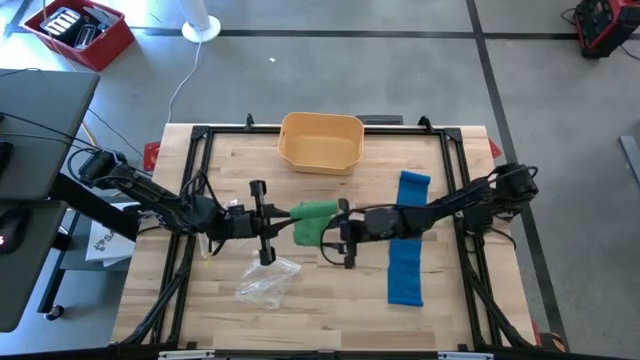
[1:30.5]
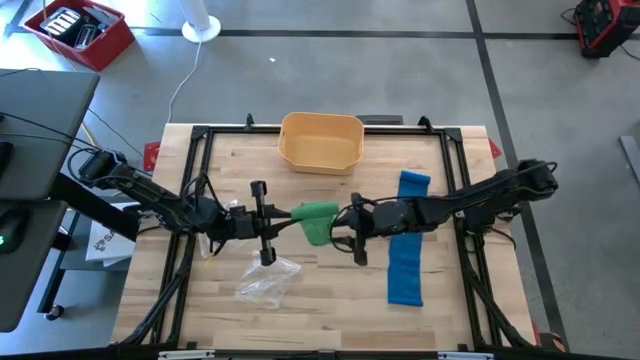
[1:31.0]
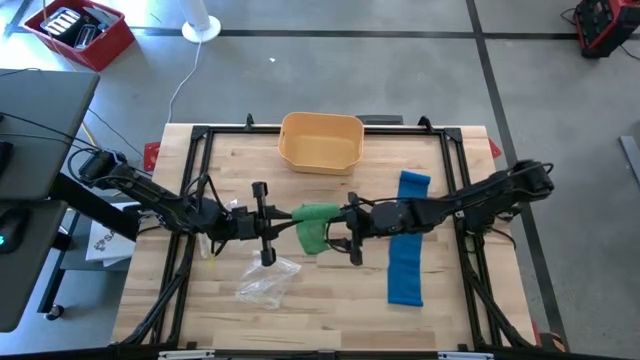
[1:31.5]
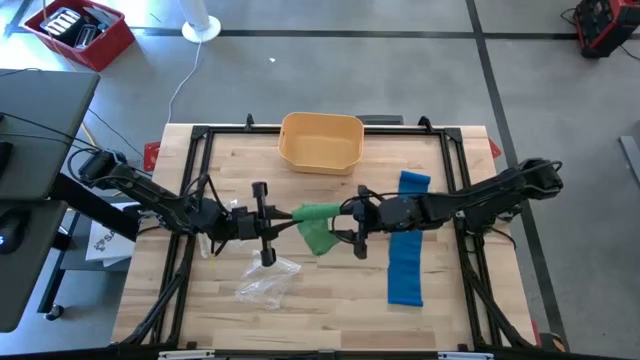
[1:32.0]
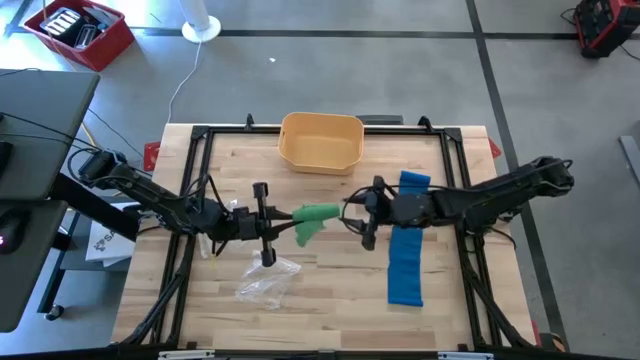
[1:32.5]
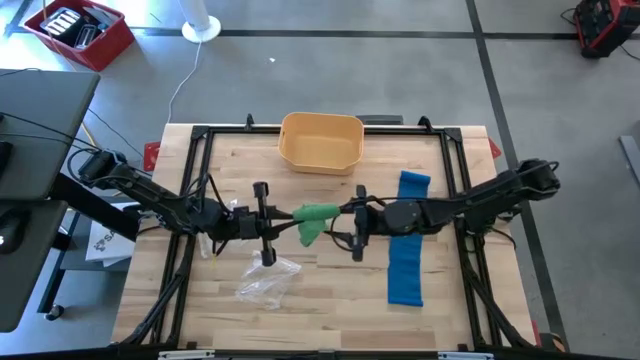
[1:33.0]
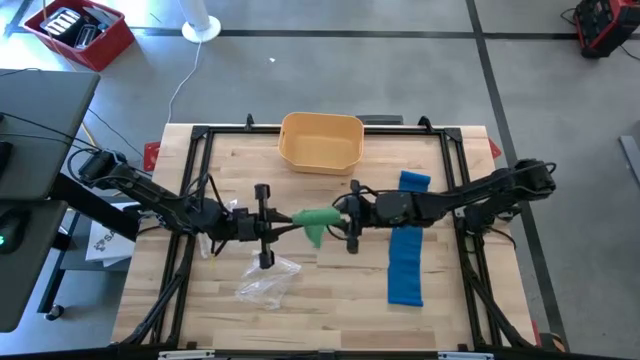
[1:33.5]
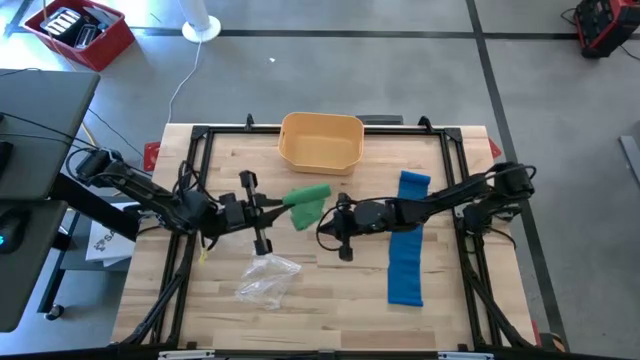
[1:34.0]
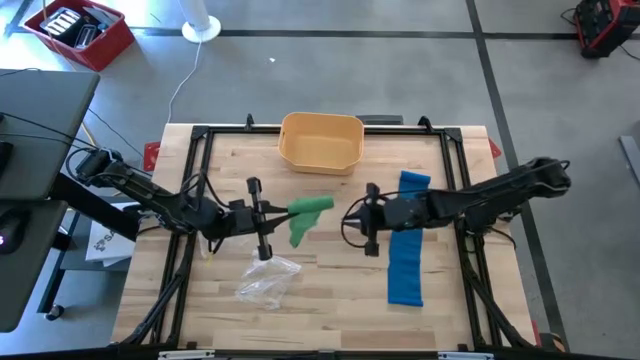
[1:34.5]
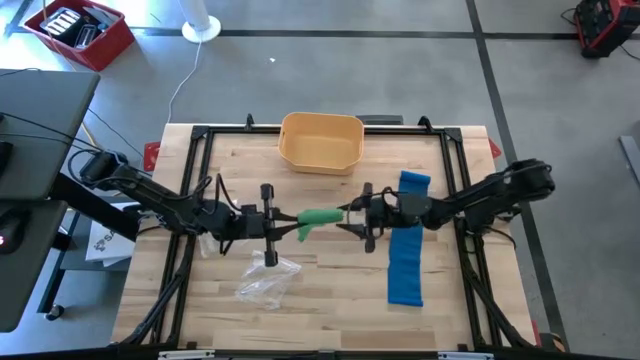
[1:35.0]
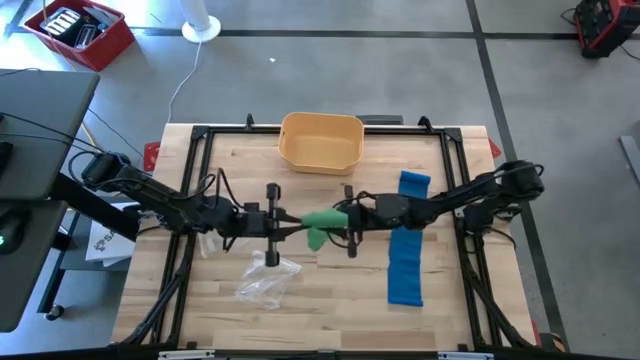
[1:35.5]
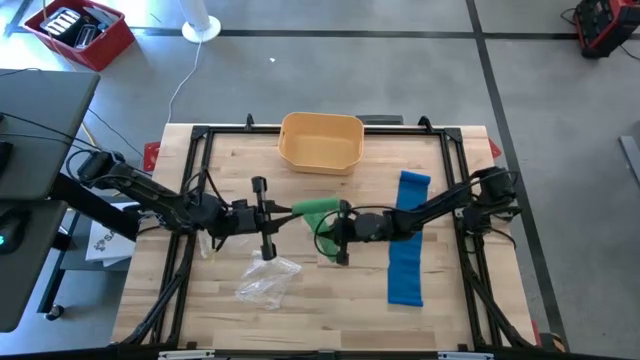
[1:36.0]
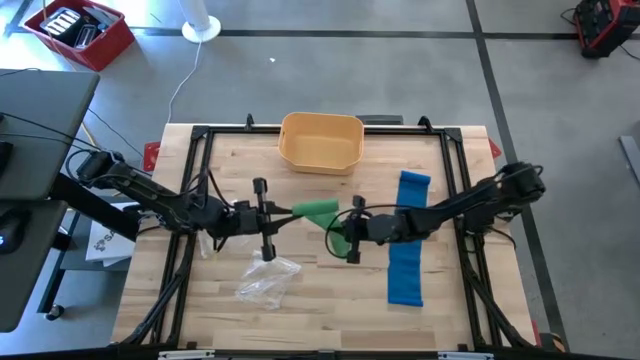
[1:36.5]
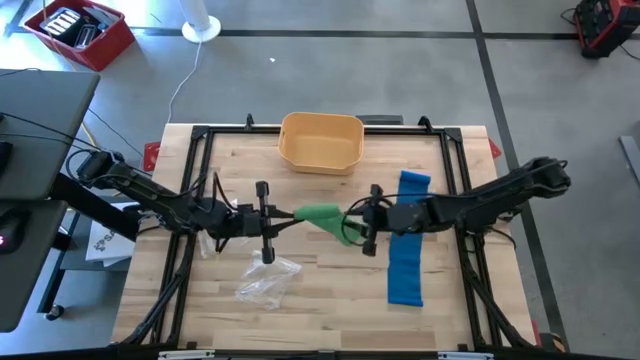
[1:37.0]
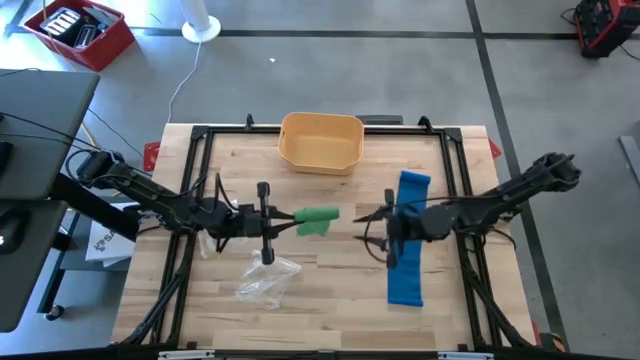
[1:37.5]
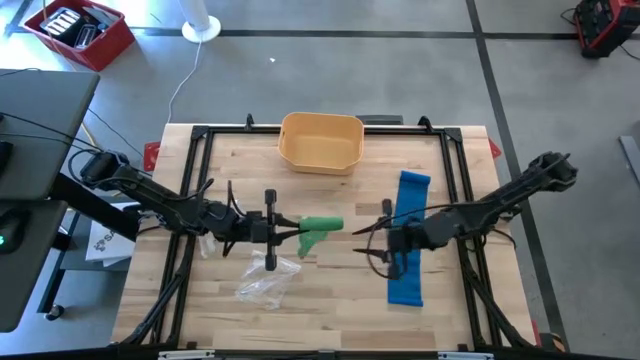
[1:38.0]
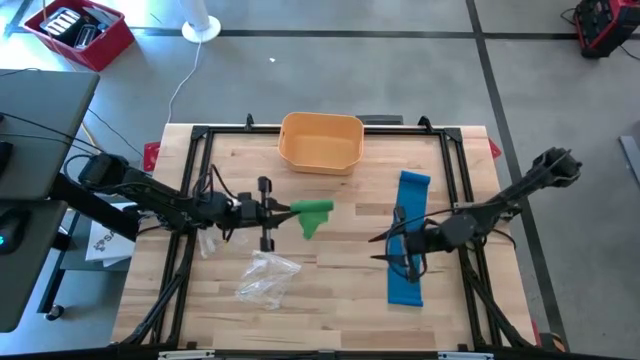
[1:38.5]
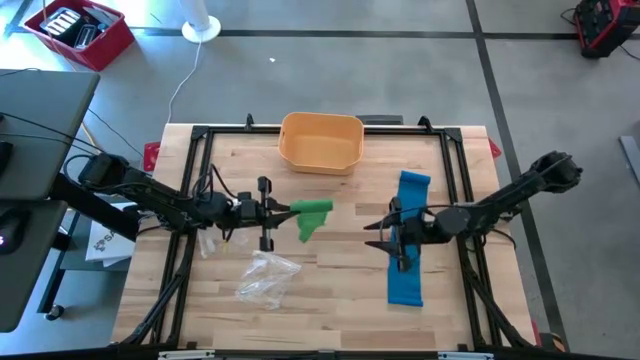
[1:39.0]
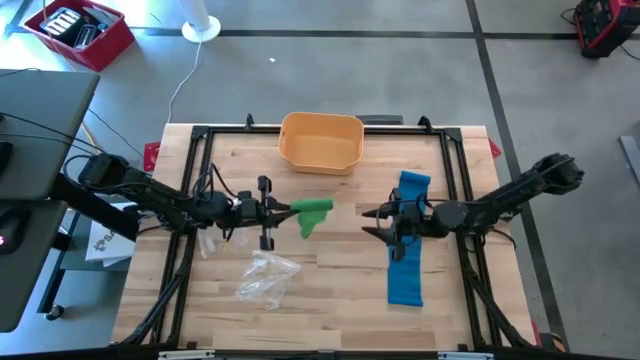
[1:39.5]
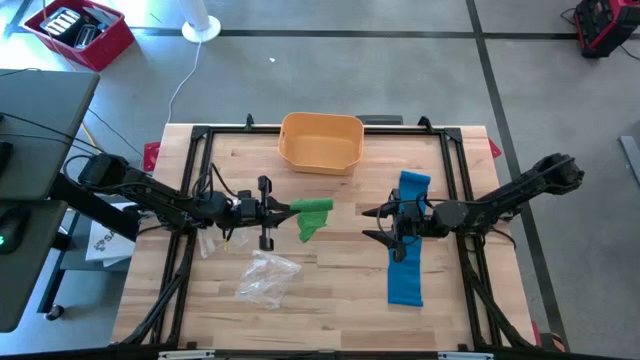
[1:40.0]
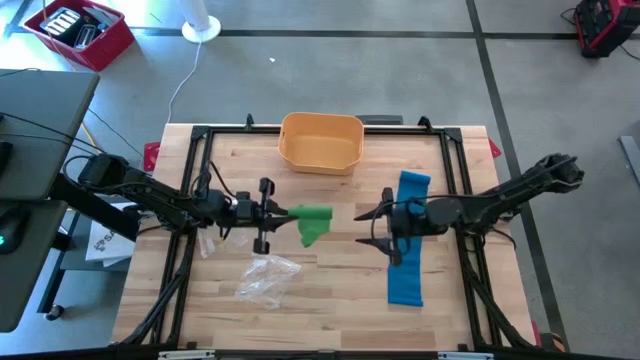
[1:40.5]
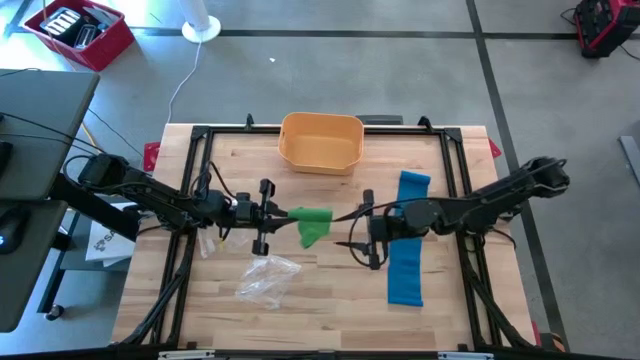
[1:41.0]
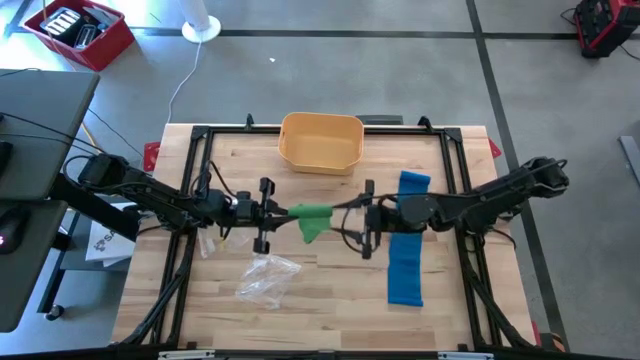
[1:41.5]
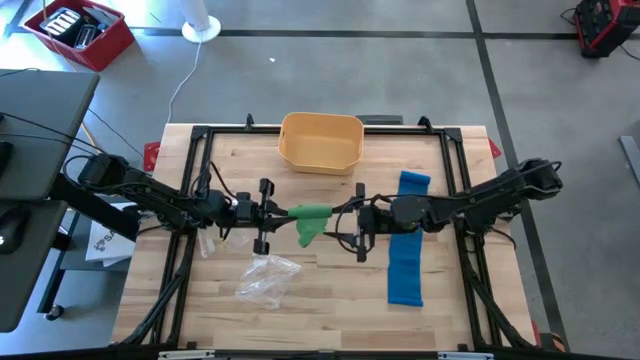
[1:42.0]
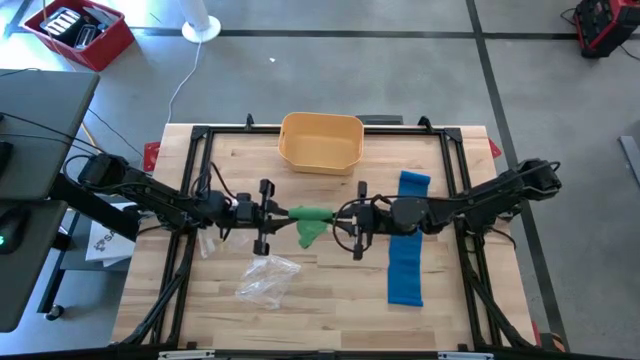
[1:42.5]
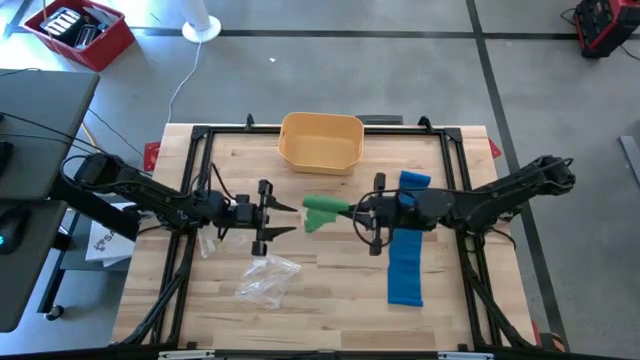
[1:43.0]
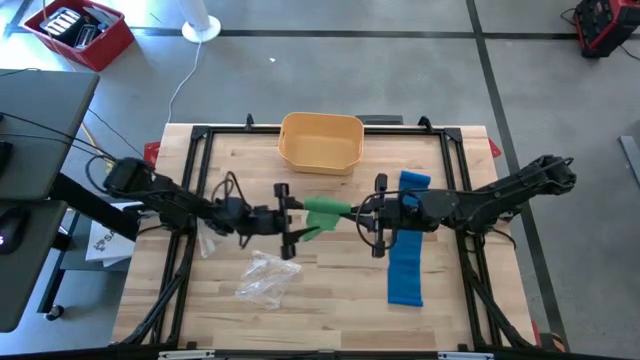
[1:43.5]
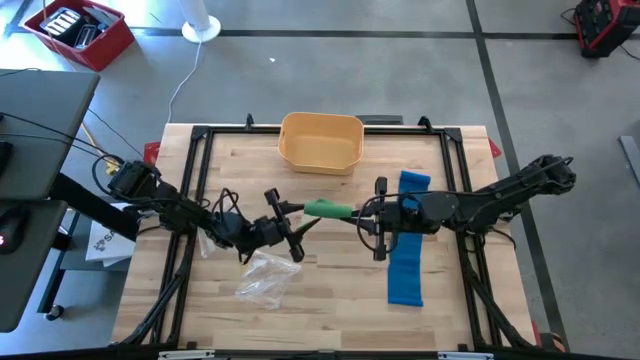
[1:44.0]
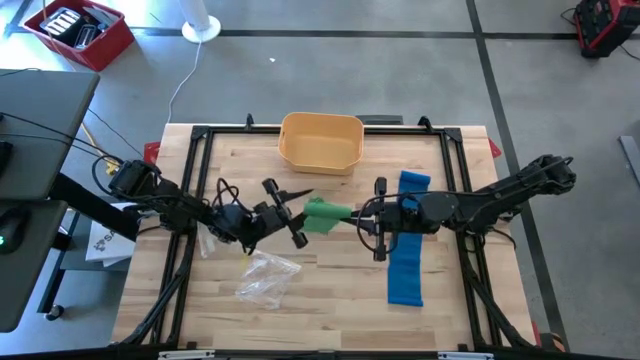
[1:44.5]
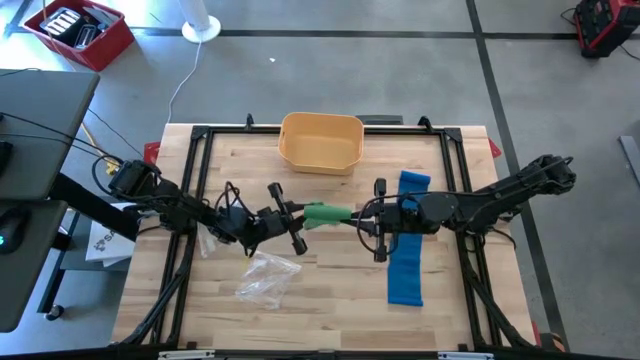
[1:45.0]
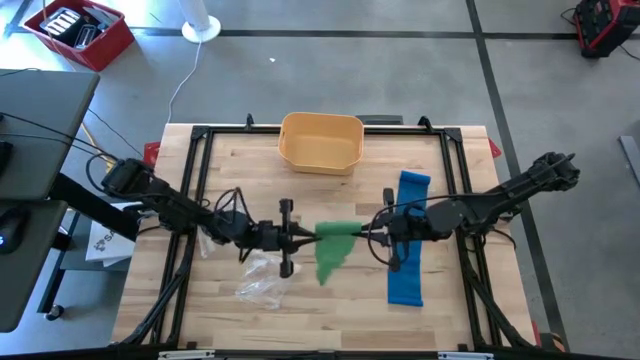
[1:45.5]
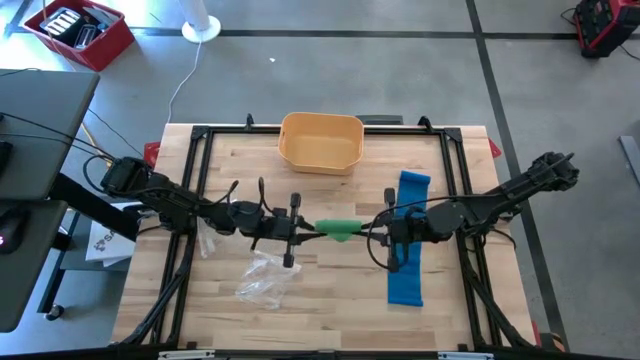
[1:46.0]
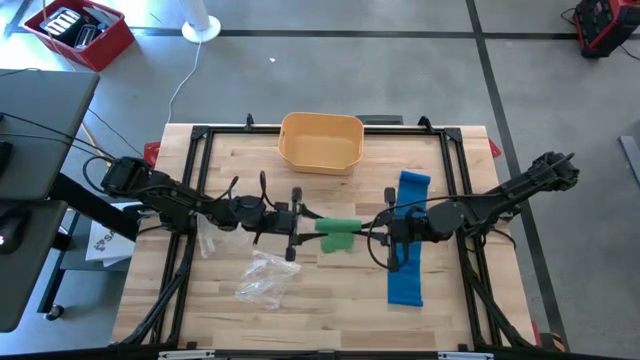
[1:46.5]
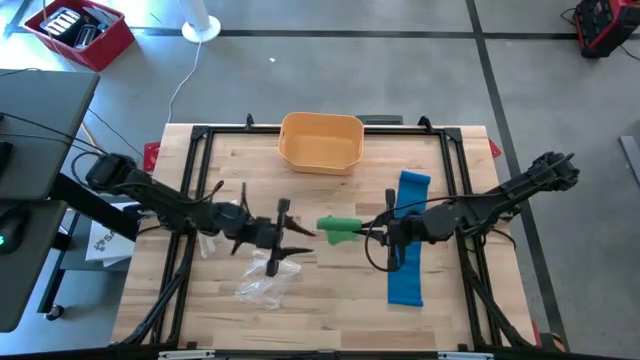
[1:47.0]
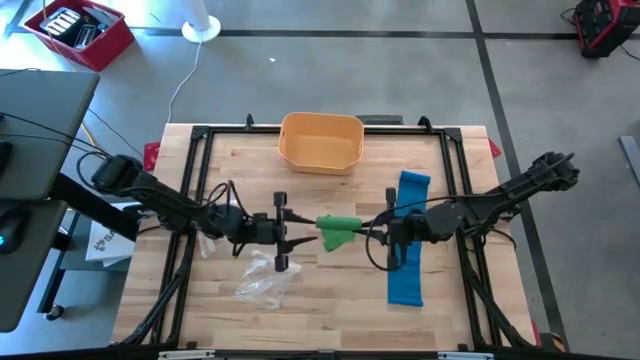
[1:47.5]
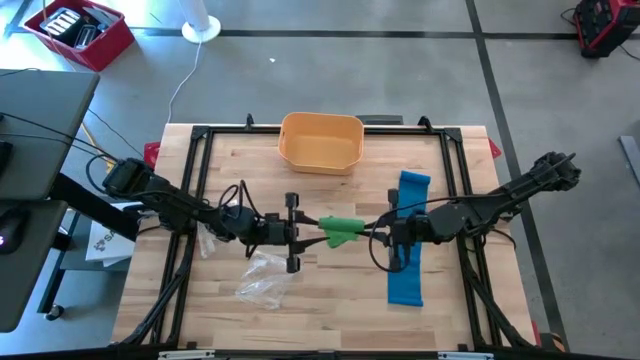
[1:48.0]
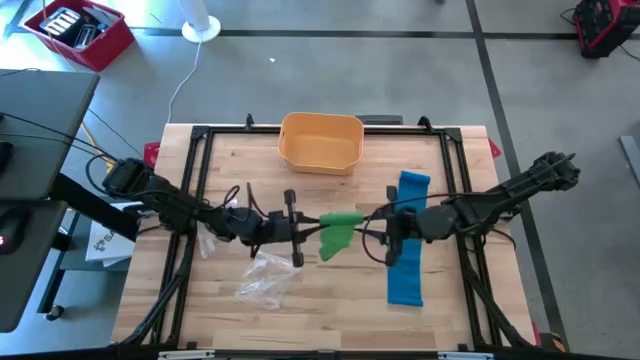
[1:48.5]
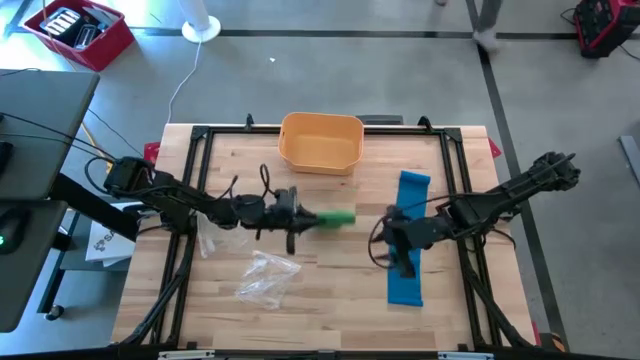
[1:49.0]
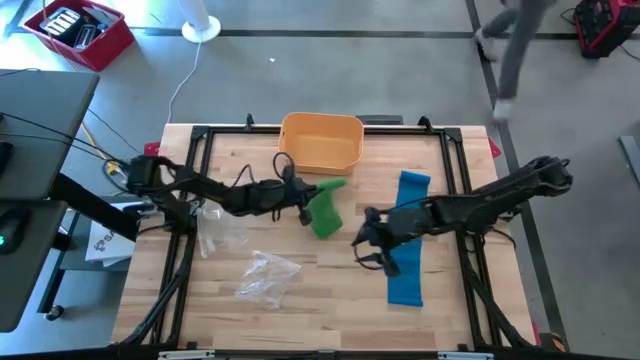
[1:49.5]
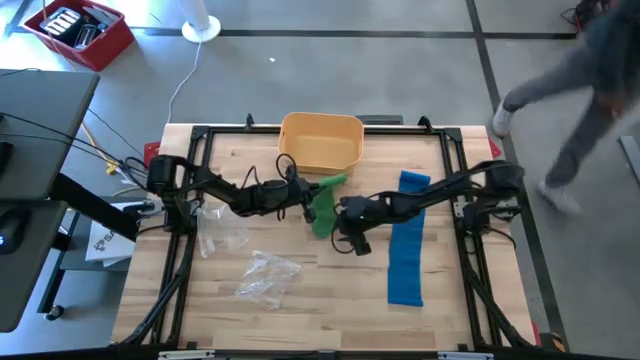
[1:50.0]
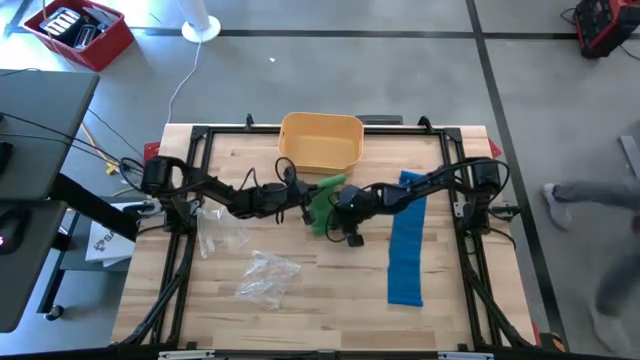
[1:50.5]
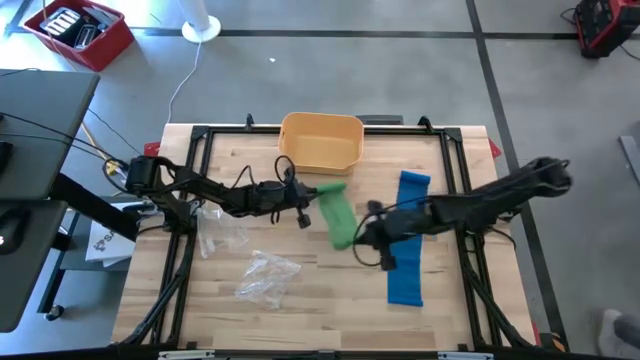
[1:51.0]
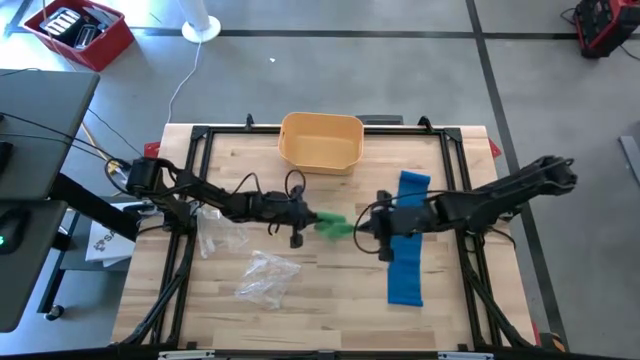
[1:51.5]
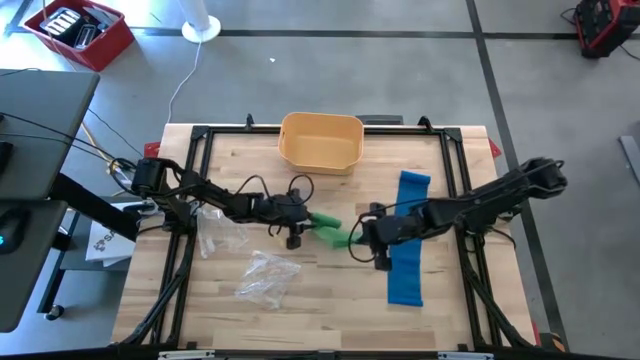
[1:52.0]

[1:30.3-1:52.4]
Task: Roll bandage
Roll the green bandage
